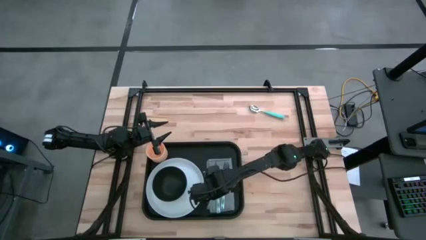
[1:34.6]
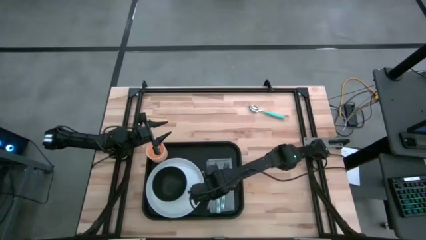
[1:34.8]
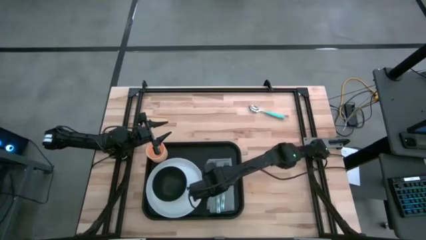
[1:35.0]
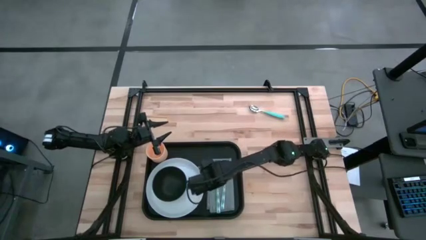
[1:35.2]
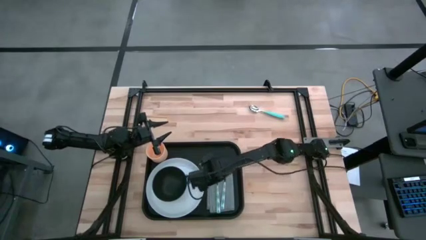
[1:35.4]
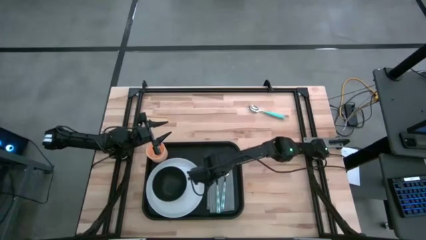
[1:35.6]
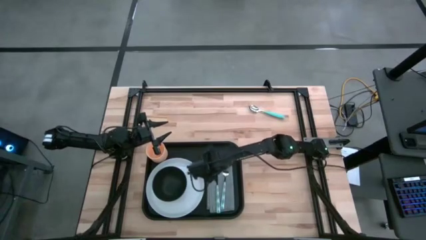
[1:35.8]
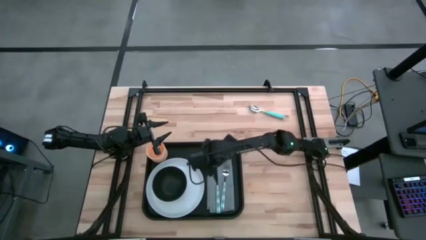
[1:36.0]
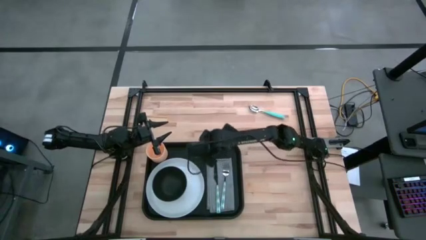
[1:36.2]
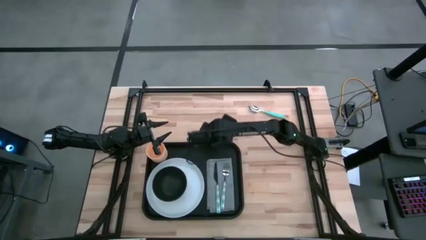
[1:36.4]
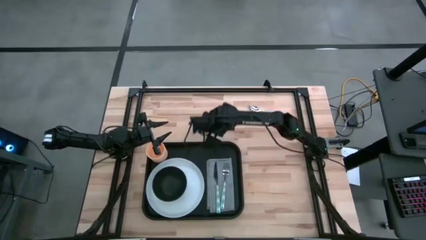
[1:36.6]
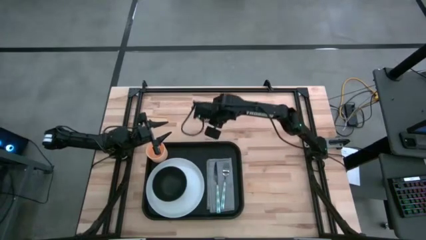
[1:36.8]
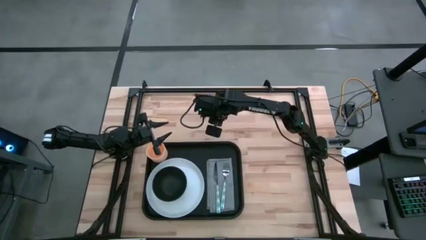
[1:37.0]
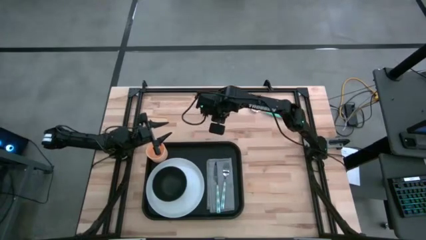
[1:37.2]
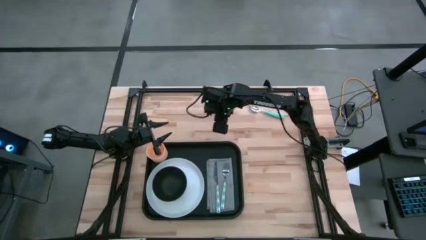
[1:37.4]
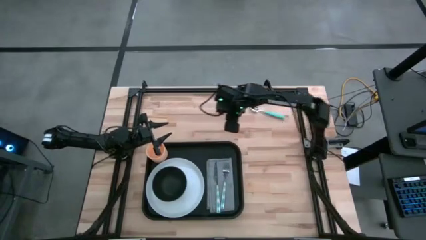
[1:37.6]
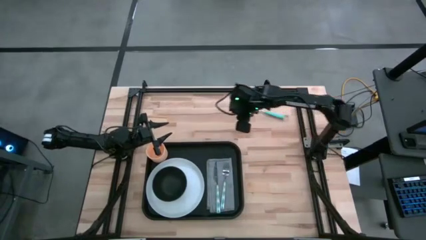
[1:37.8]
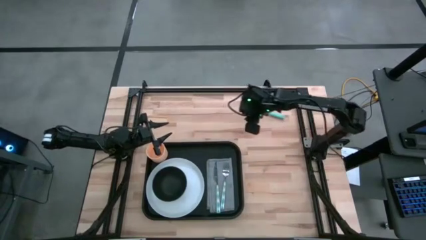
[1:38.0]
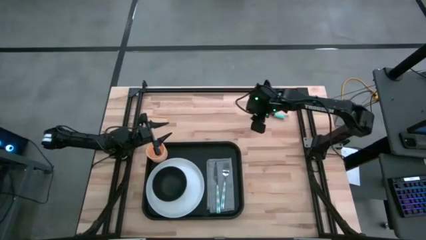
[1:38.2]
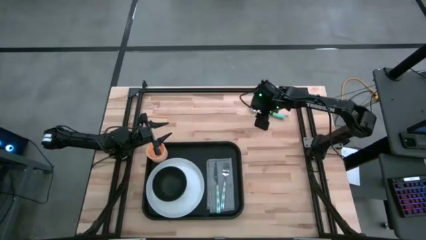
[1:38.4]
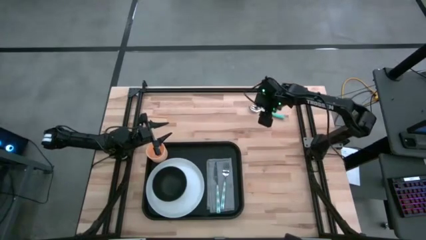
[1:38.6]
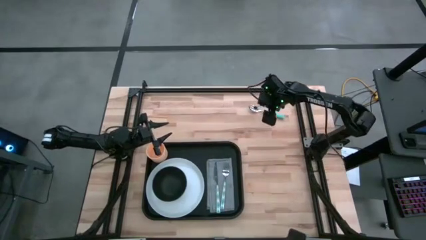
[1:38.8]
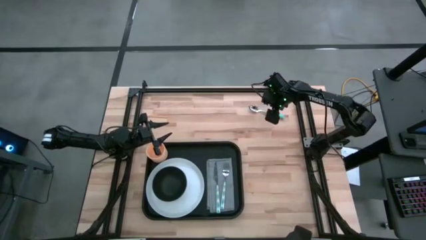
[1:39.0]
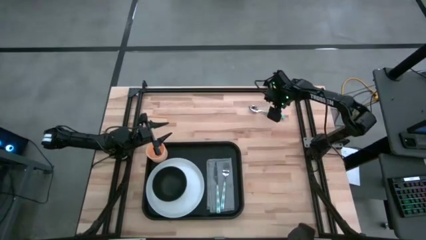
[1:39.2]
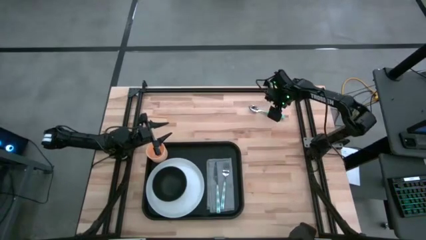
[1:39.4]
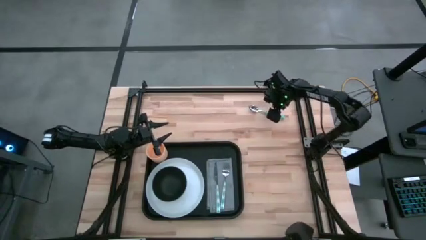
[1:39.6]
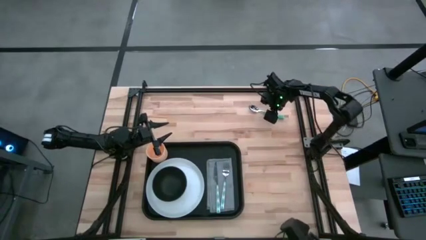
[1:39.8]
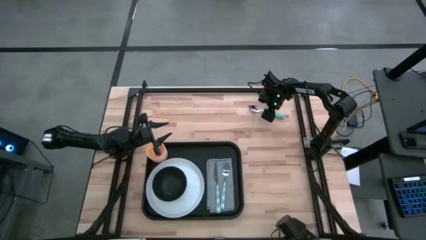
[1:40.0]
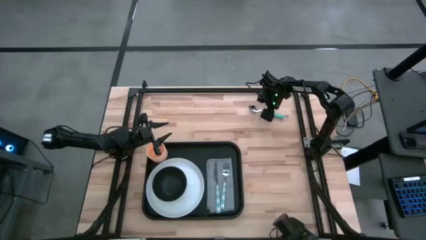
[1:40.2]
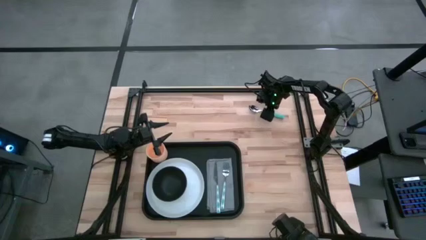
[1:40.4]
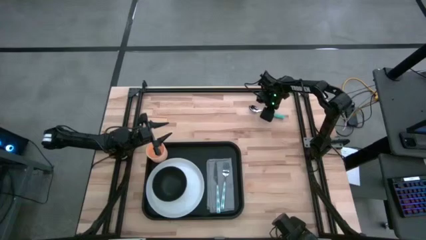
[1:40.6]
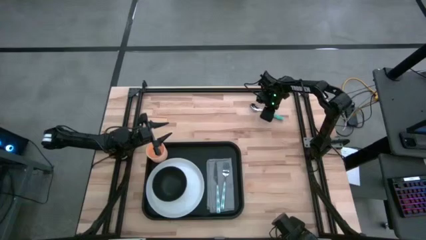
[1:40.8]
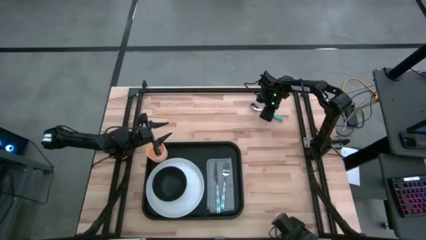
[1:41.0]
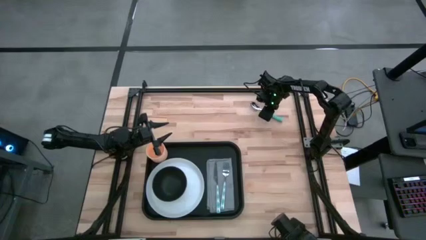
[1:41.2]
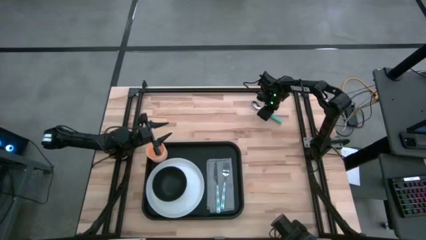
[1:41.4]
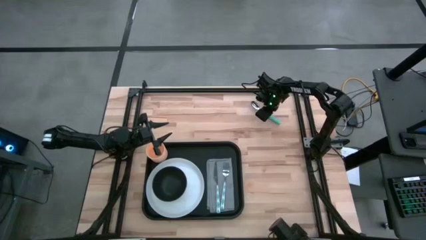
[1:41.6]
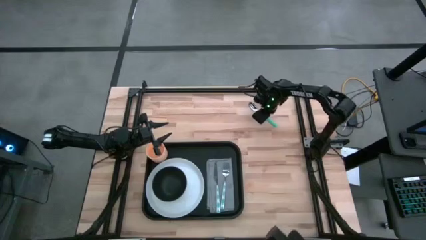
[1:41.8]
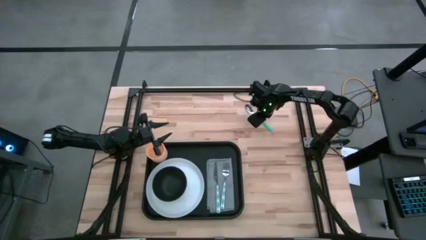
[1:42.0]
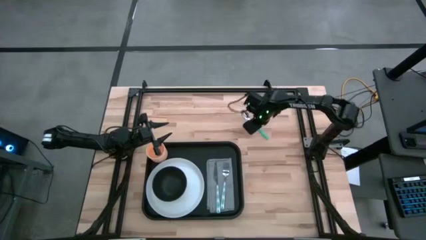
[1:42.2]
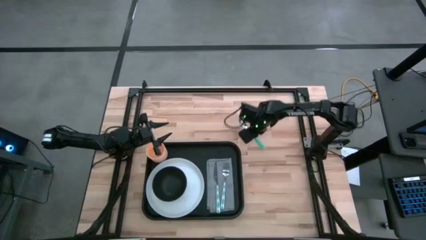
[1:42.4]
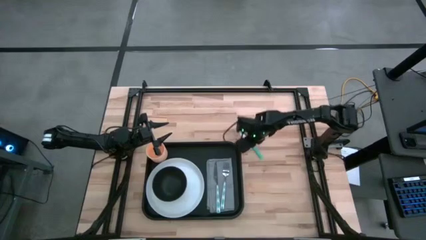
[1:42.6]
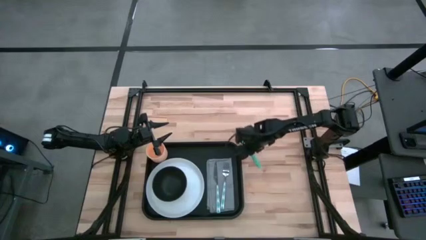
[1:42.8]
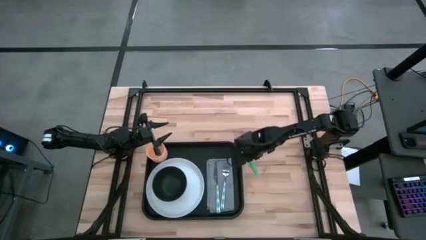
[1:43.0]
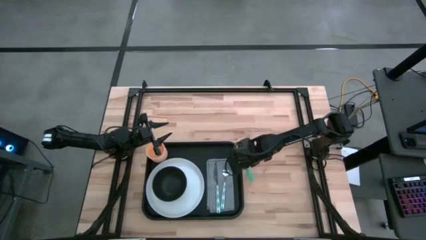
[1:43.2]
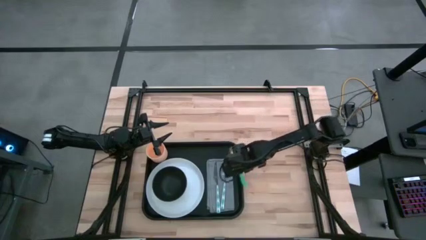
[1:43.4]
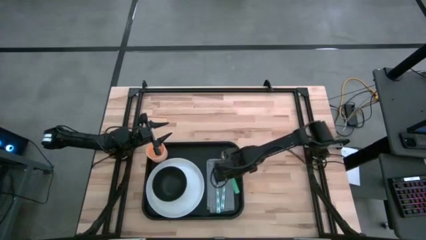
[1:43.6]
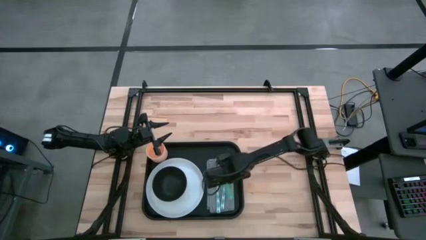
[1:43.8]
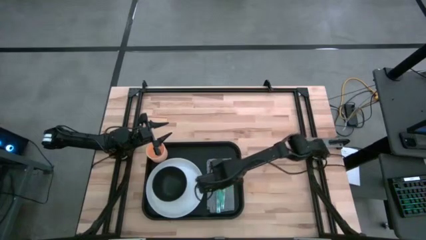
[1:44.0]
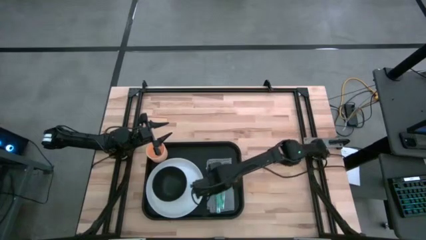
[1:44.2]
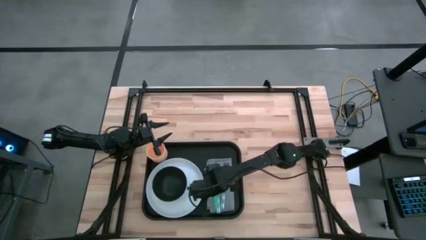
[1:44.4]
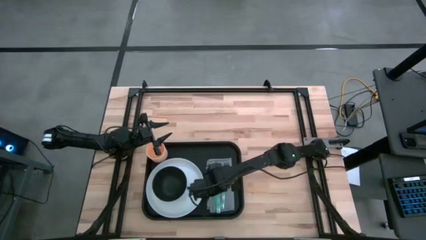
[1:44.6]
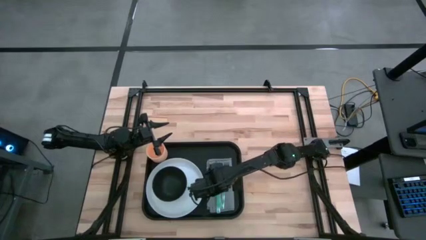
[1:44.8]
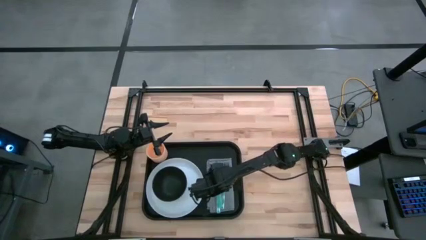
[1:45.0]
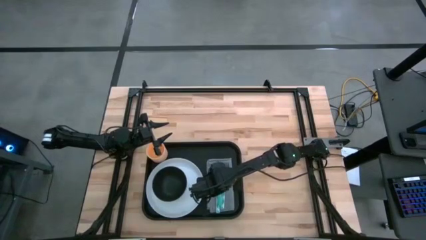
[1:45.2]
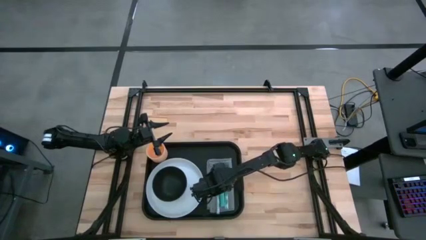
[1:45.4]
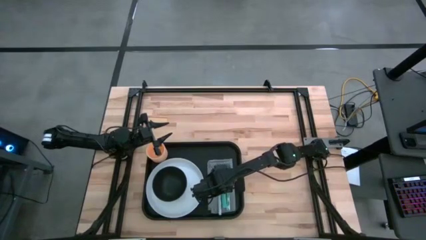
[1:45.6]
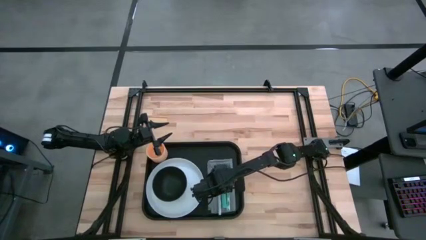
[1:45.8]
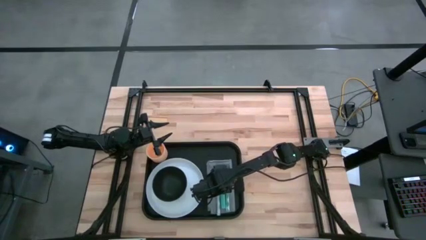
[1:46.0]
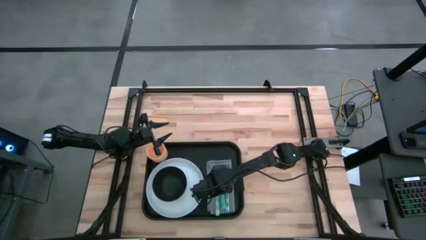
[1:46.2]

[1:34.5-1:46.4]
Task: Set up tray
Put the green spoon on the gray napkin to the left of the green patterned fork
